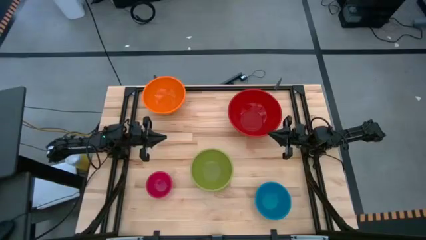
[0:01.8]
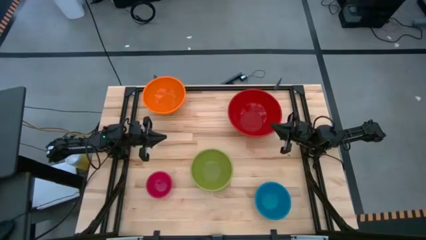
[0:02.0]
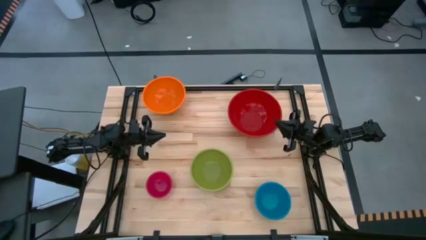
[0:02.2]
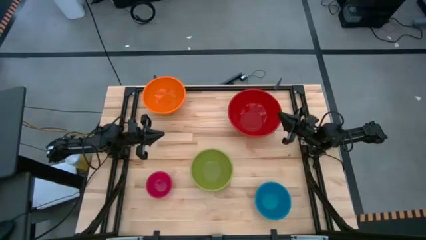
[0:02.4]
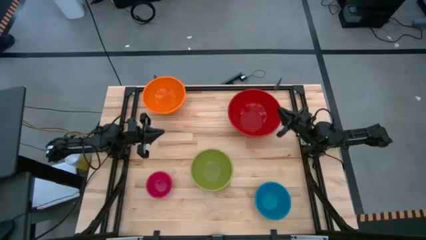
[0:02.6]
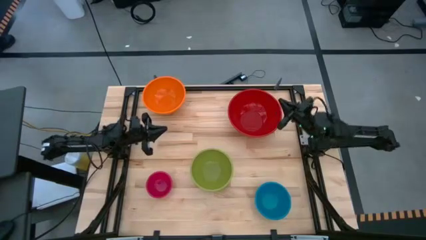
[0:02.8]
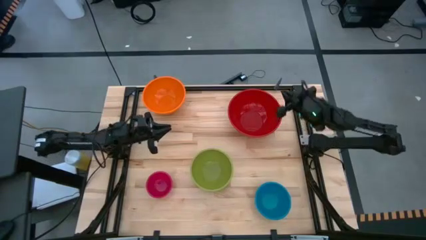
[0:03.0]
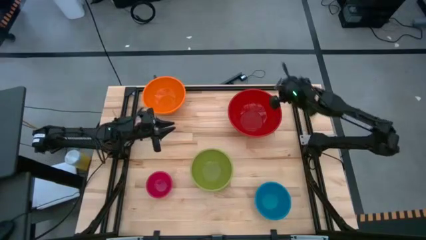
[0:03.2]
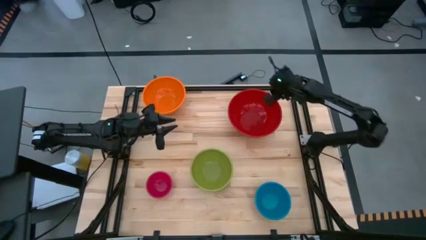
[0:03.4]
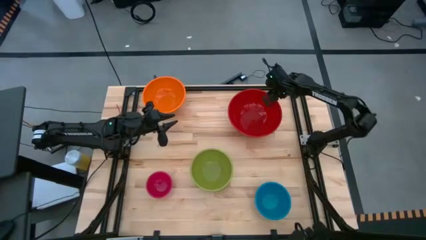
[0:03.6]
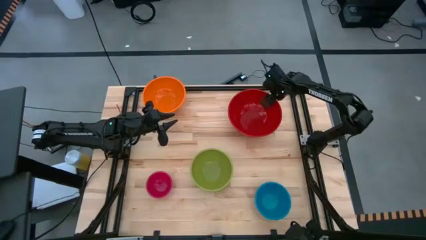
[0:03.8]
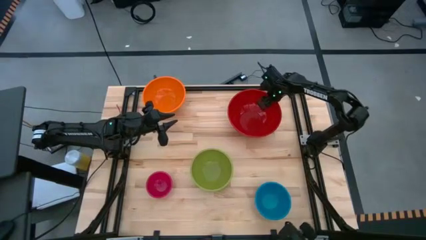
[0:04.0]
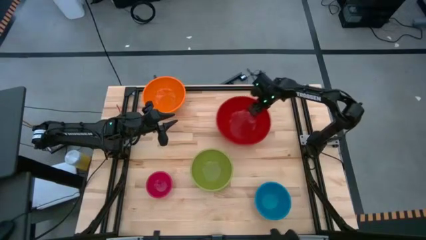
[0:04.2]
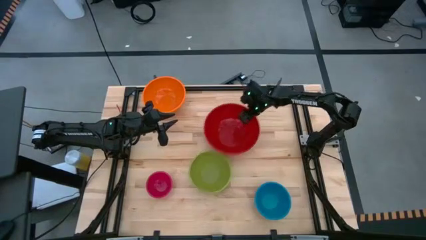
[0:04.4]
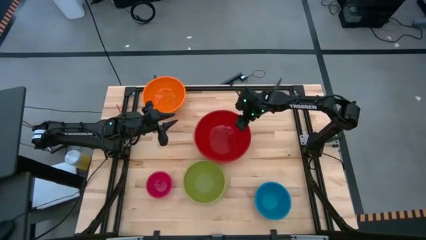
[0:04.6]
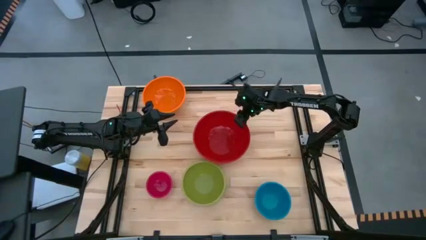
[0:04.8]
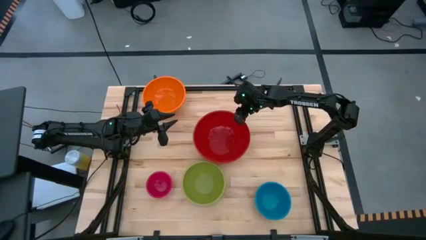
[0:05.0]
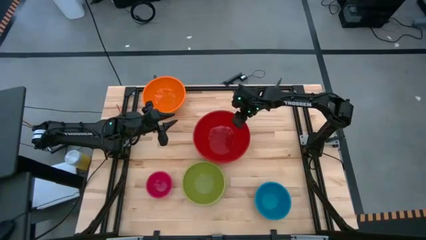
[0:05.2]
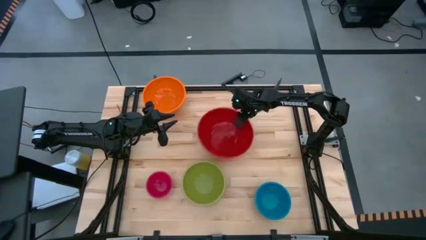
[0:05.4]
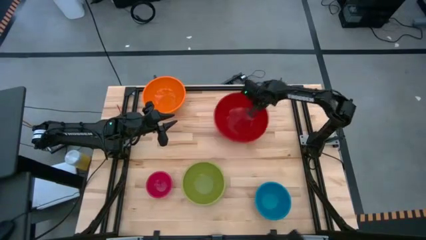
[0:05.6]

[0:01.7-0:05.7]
Prepare big red bowl

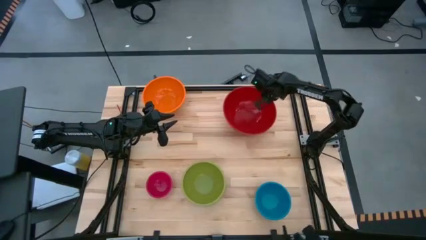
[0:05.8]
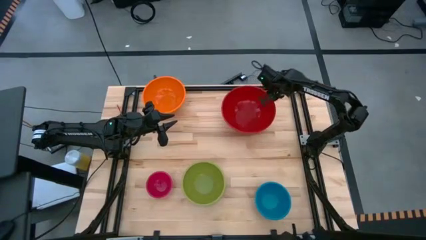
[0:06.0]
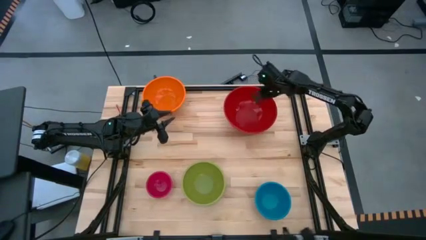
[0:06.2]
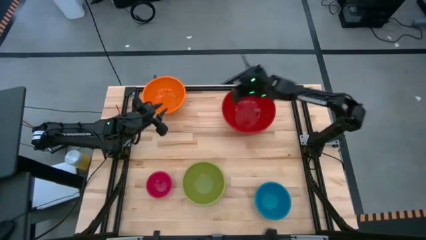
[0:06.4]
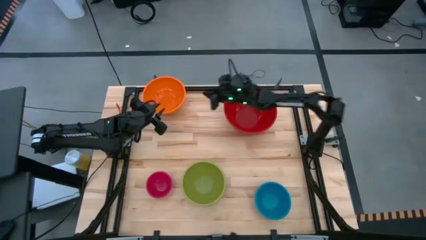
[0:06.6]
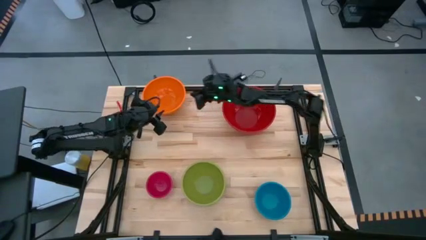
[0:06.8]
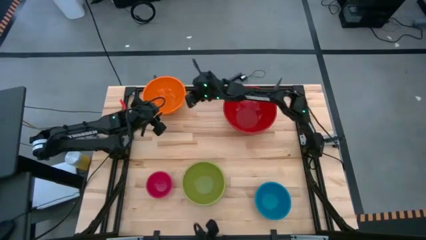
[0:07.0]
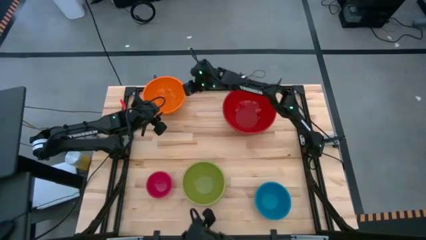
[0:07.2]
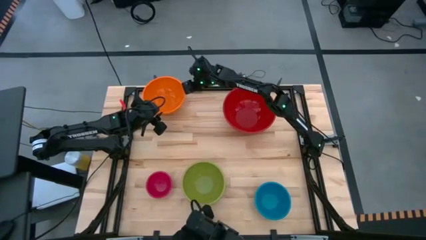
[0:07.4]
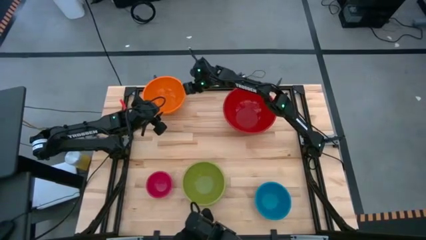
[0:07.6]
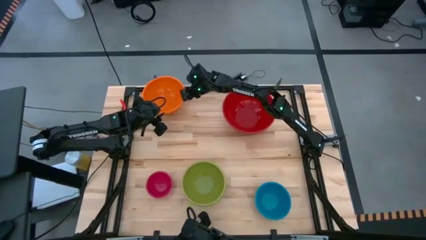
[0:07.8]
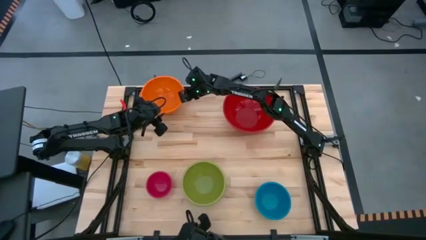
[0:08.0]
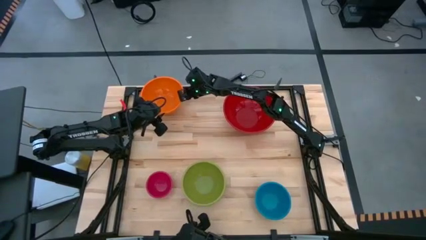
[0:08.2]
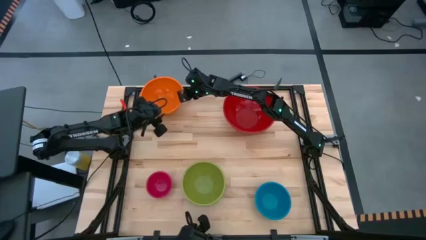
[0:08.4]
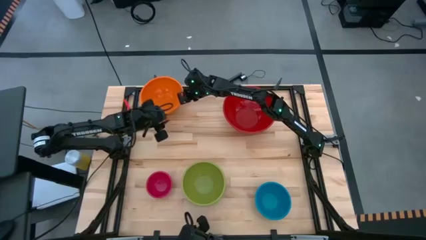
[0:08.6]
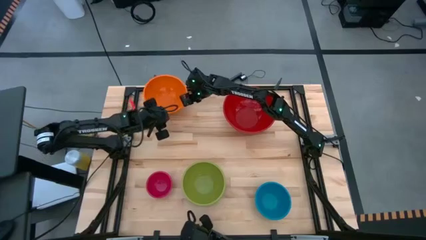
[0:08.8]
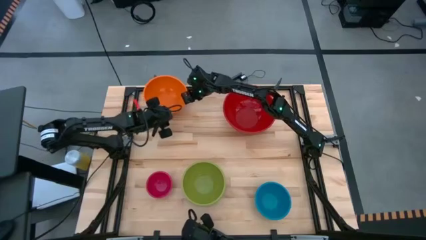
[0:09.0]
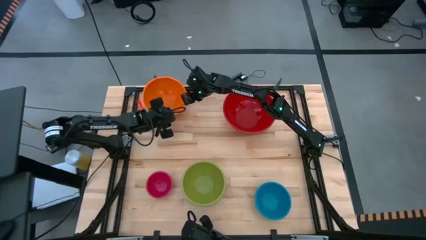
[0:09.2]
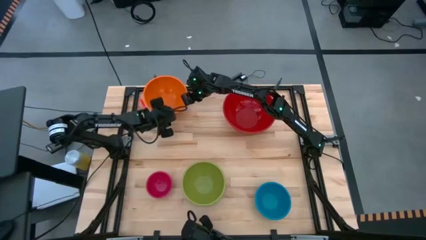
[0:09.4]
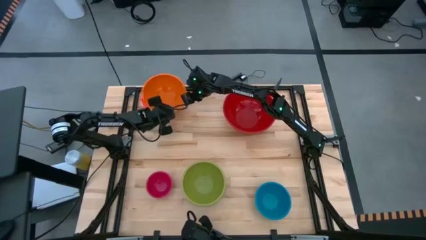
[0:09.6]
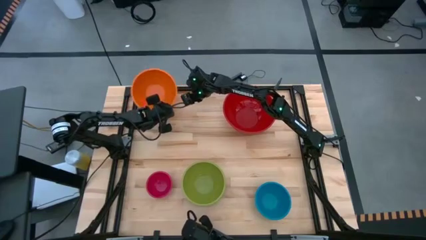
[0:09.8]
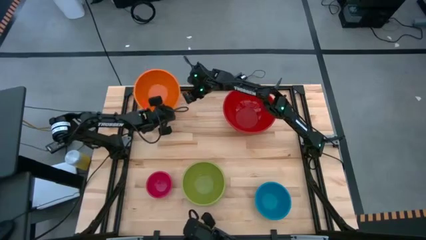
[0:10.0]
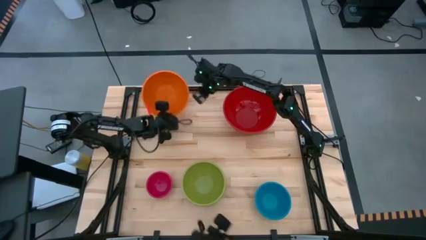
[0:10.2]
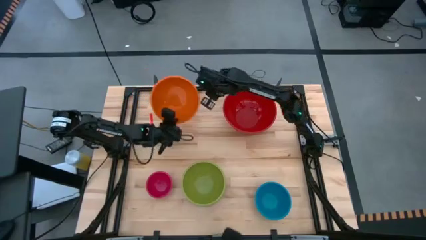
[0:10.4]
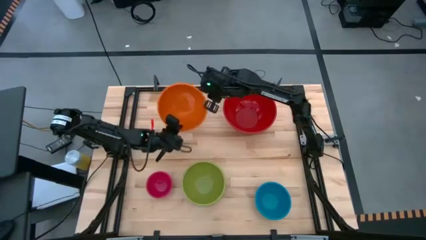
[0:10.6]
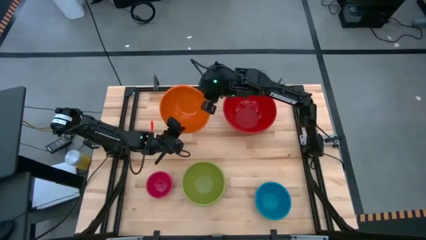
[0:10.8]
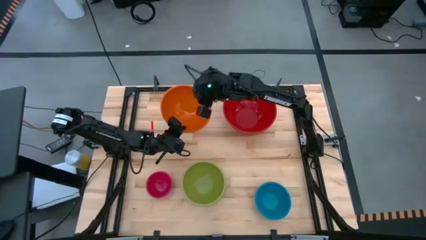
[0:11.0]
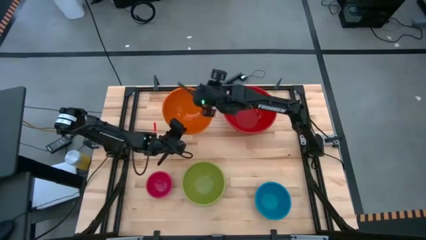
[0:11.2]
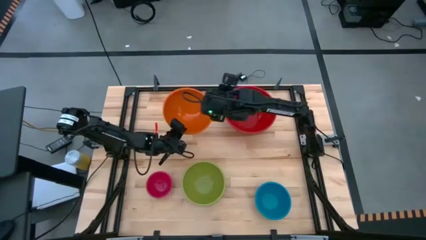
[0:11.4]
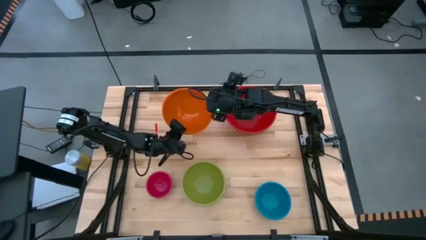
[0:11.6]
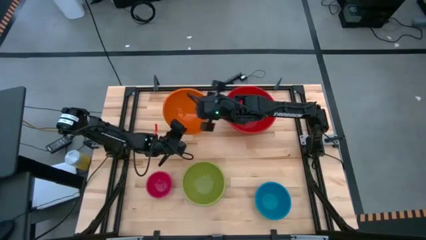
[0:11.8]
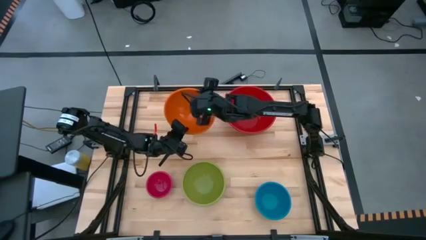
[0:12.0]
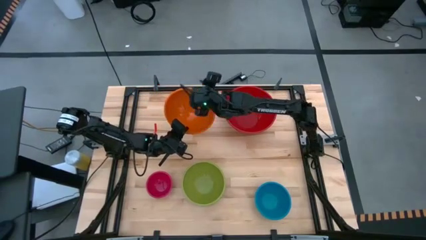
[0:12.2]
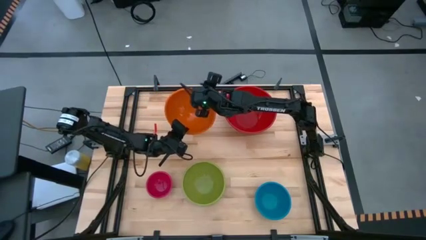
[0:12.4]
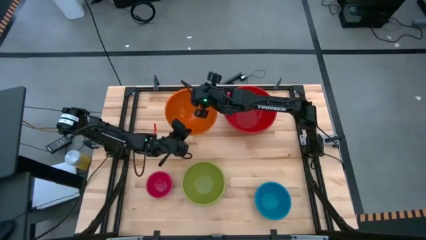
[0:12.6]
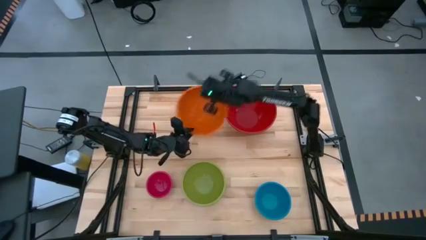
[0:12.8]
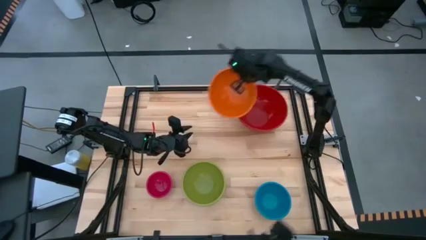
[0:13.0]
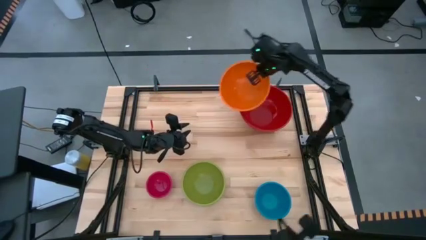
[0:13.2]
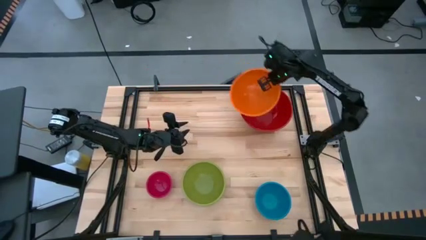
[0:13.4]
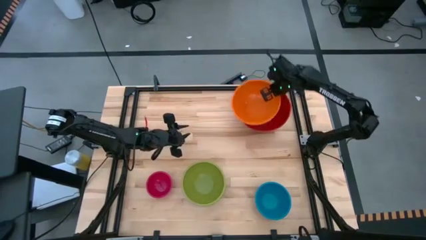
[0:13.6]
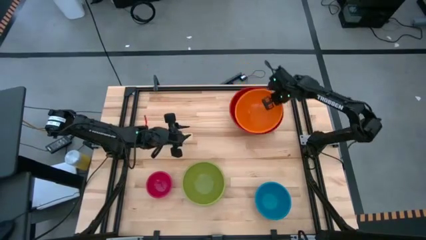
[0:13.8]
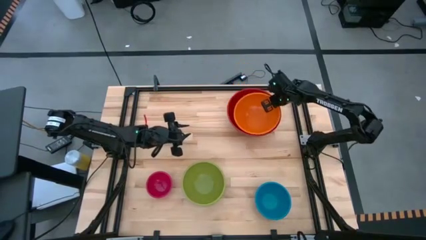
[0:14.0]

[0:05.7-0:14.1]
Stack the orange bowl on top of the red bowl

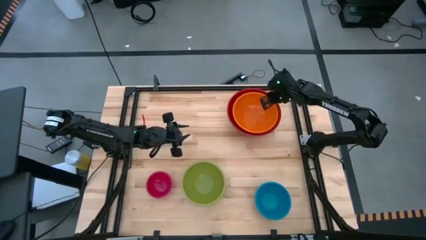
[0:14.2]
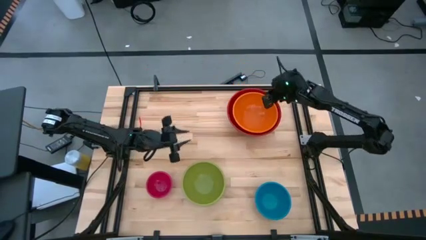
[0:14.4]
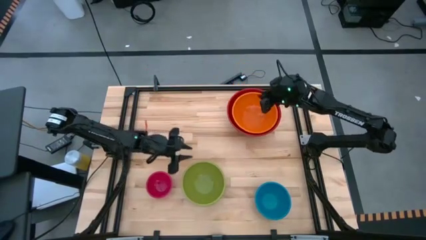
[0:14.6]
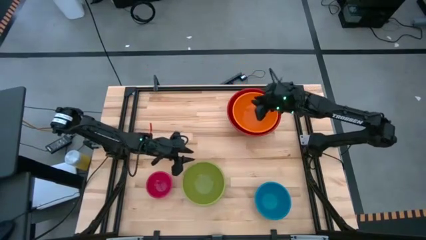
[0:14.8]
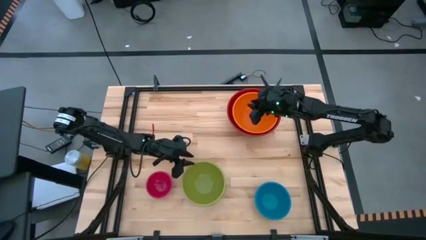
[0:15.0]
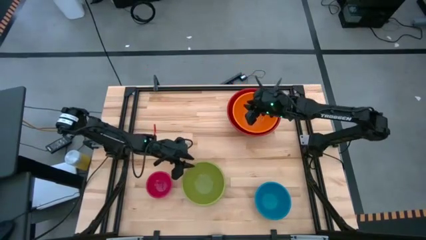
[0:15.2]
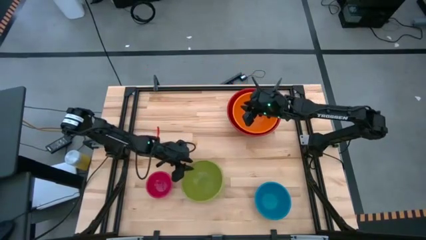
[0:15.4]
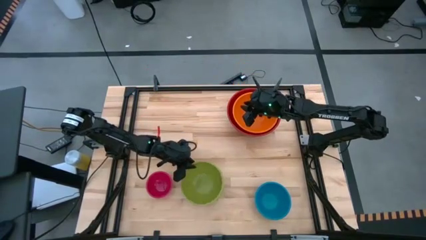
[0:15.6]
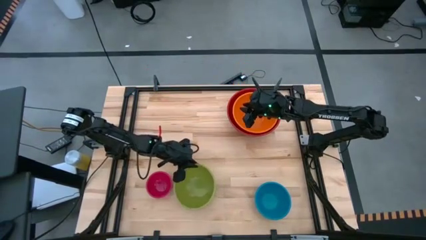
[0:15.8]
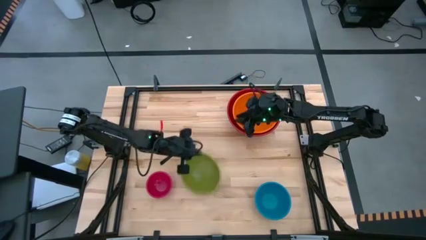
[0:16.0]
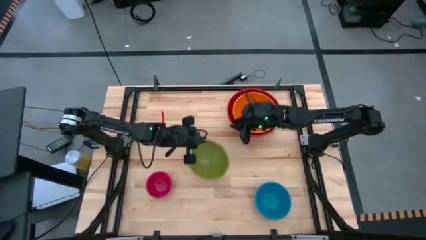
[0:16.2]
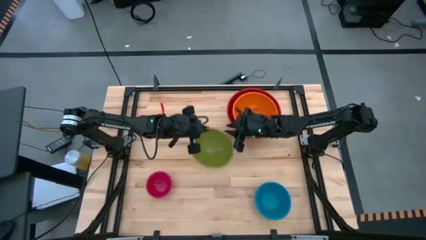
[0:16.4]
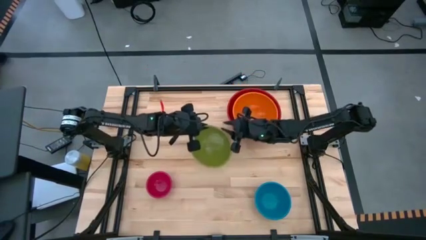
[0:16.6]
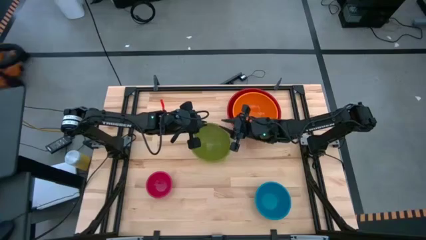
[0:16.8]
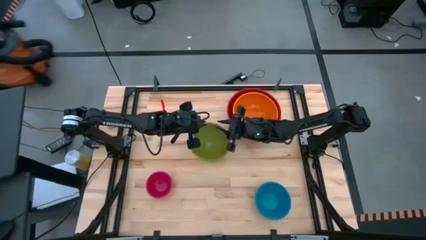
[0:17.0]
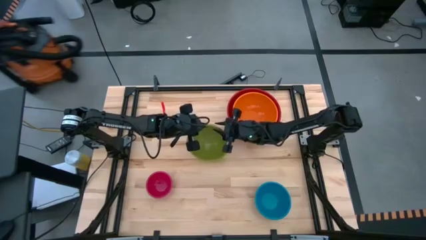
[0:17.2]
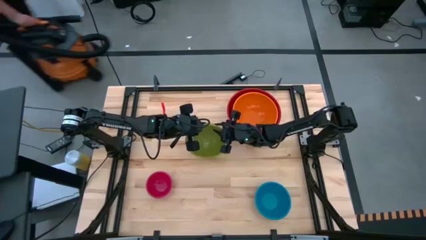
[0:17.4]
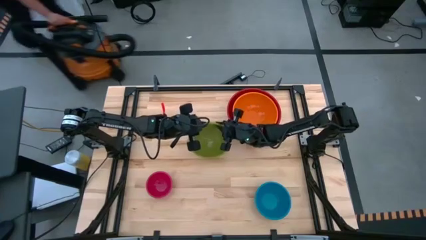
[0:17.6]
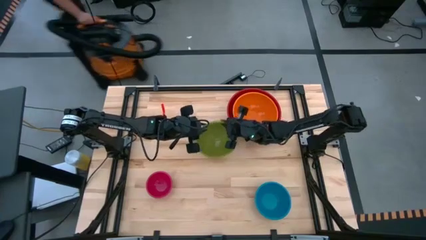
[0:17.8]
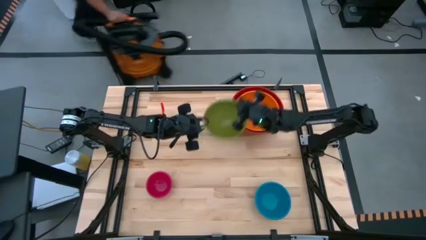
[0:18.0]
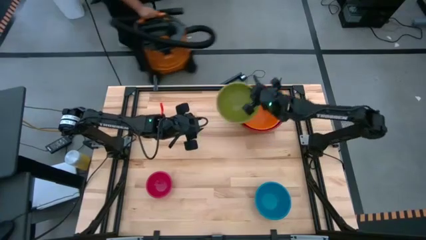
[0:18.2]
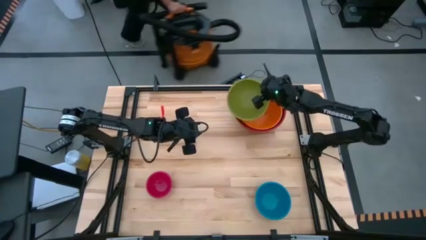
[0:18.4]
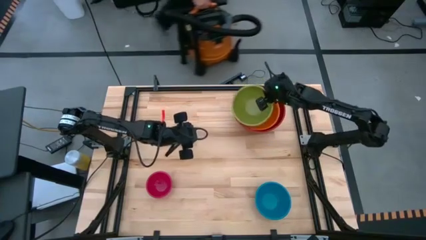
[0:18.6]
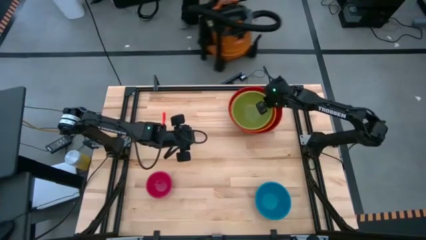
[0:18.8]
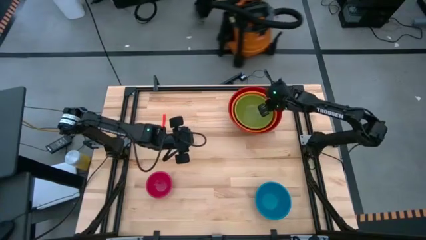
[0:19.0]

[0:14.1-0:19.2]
Stack the green bowl on top of the Orange bowl
